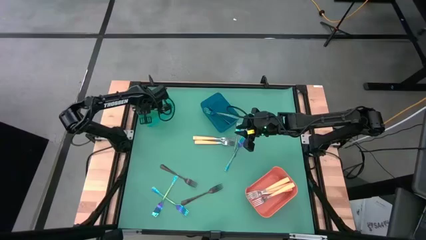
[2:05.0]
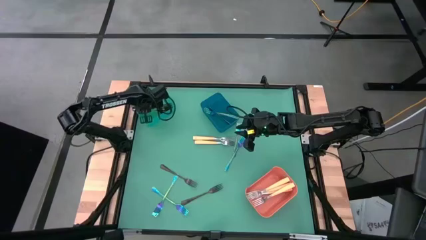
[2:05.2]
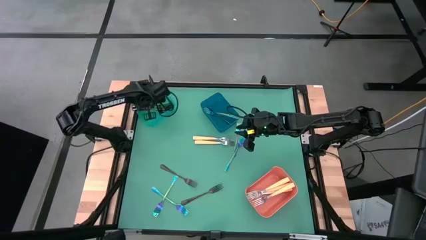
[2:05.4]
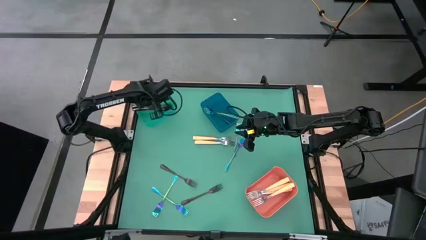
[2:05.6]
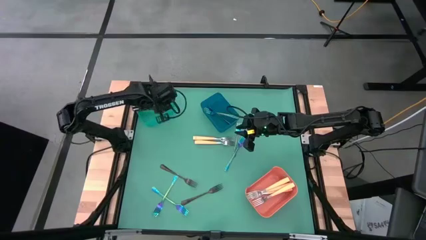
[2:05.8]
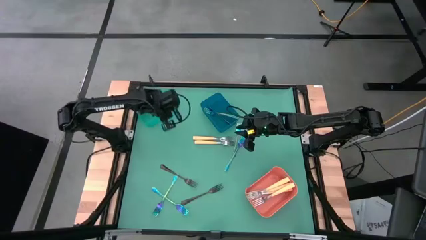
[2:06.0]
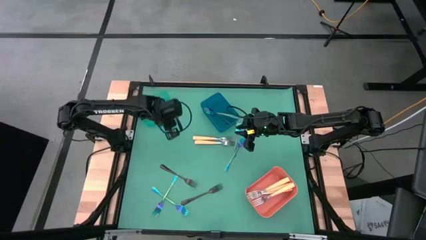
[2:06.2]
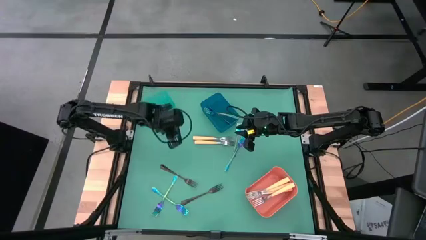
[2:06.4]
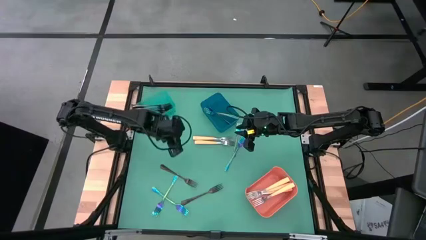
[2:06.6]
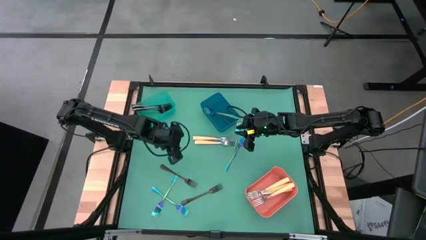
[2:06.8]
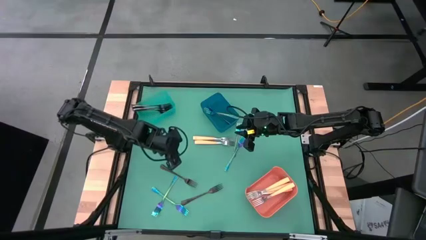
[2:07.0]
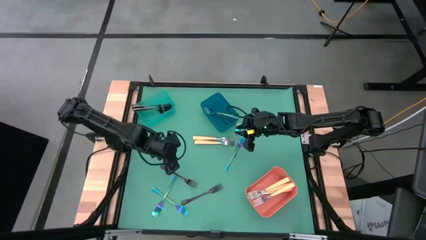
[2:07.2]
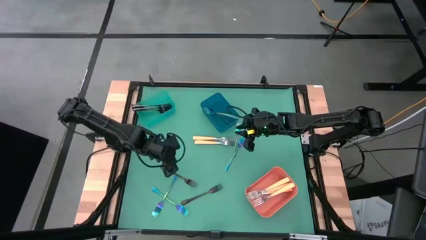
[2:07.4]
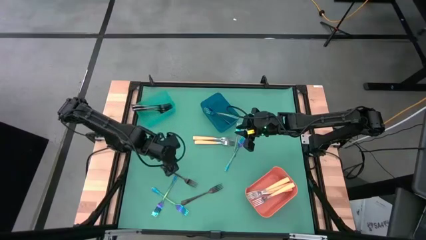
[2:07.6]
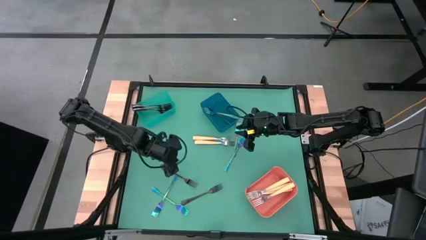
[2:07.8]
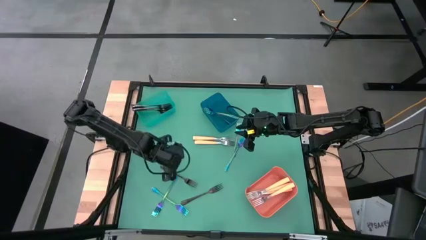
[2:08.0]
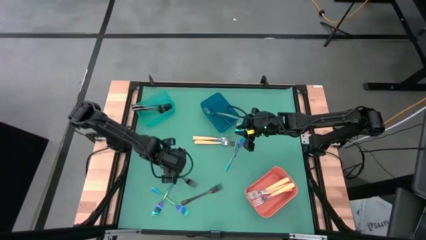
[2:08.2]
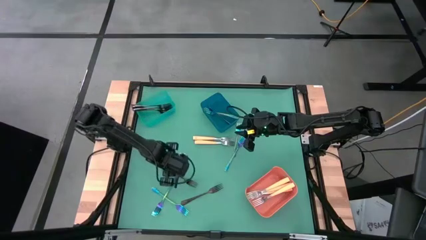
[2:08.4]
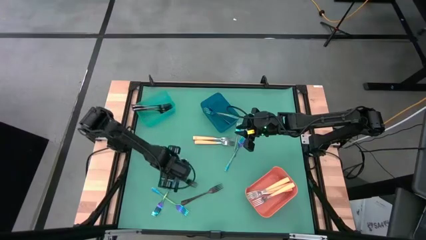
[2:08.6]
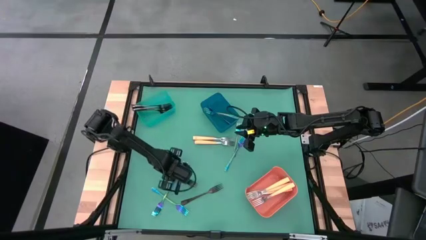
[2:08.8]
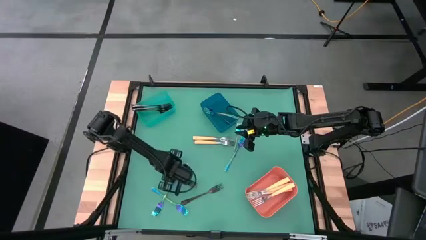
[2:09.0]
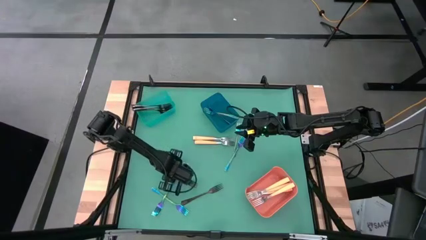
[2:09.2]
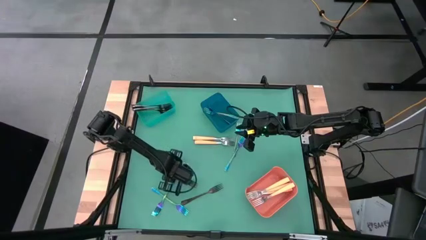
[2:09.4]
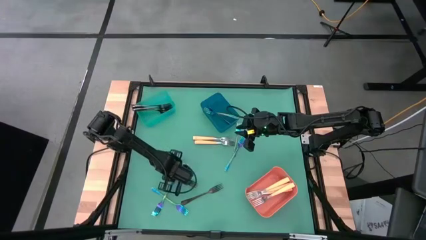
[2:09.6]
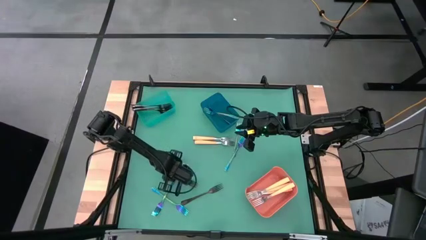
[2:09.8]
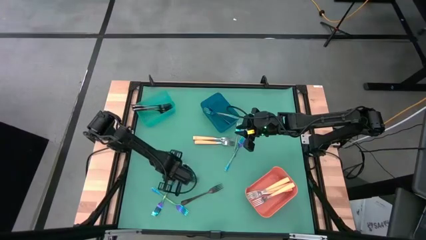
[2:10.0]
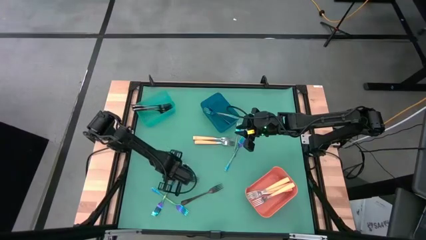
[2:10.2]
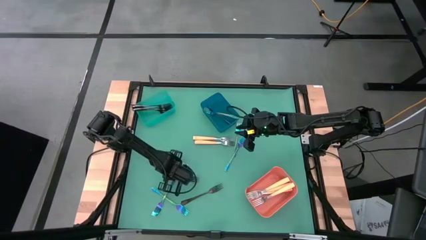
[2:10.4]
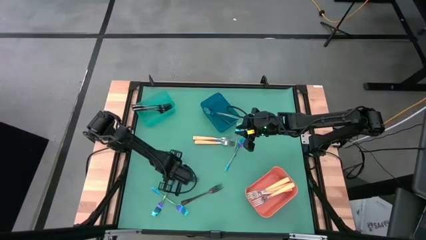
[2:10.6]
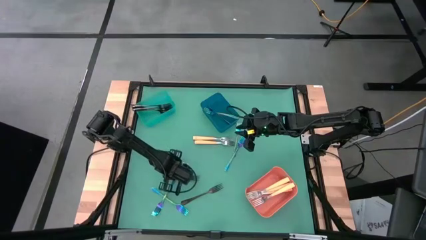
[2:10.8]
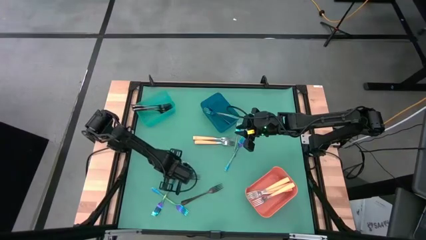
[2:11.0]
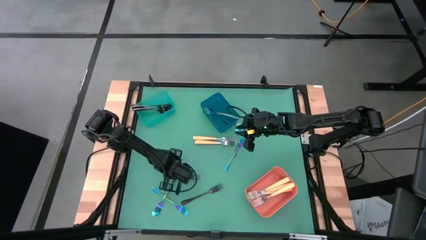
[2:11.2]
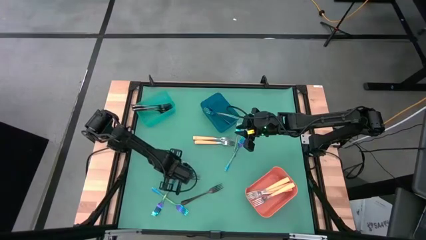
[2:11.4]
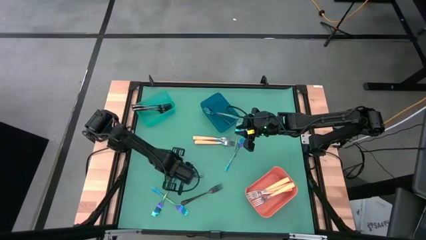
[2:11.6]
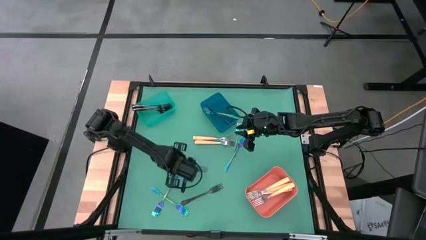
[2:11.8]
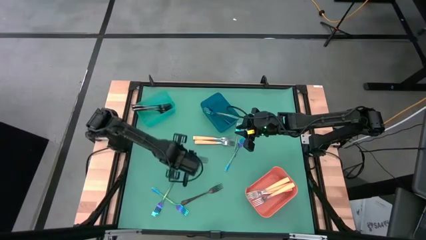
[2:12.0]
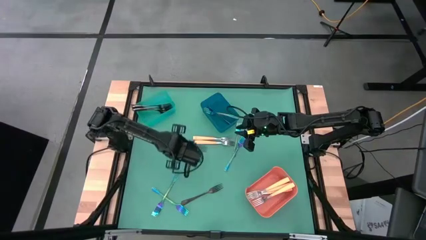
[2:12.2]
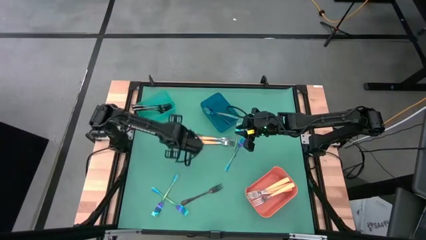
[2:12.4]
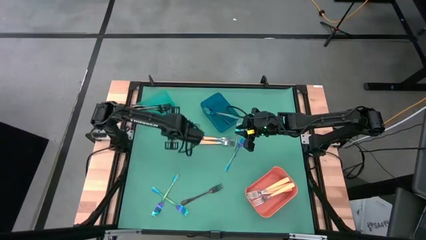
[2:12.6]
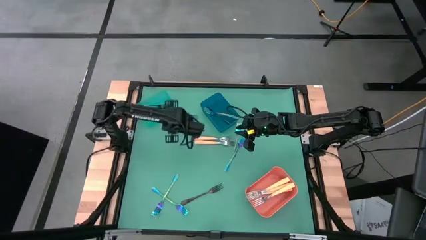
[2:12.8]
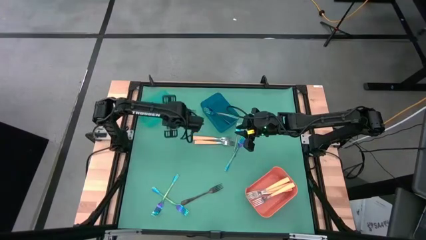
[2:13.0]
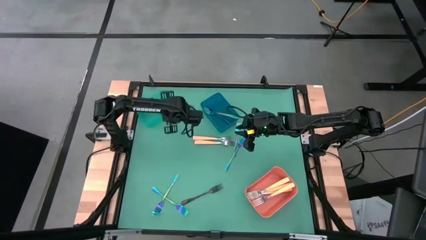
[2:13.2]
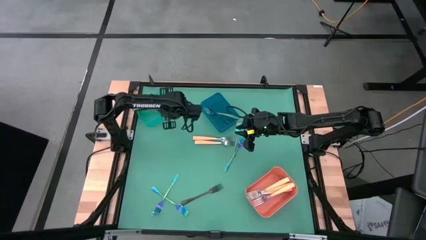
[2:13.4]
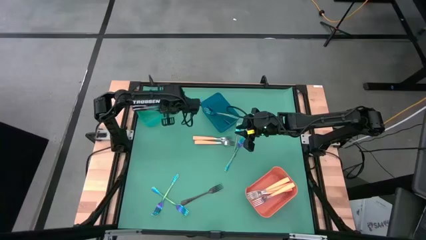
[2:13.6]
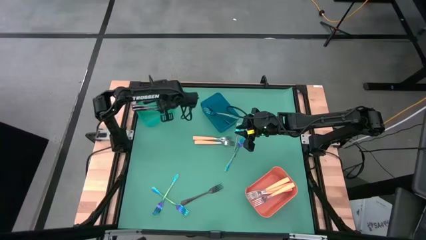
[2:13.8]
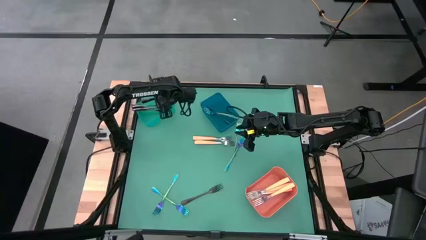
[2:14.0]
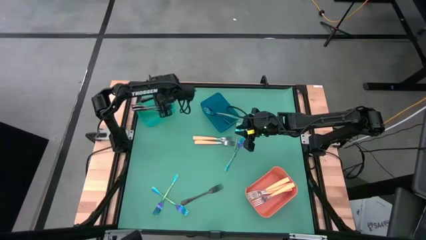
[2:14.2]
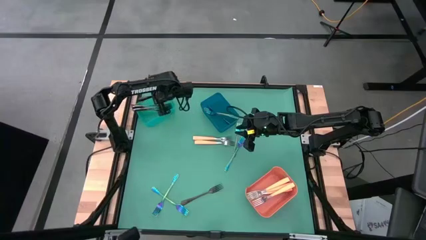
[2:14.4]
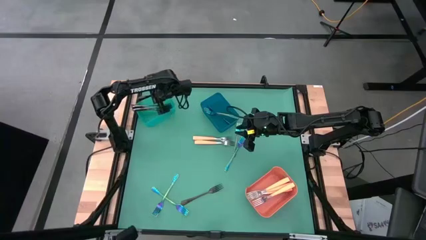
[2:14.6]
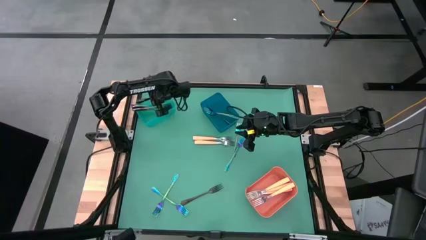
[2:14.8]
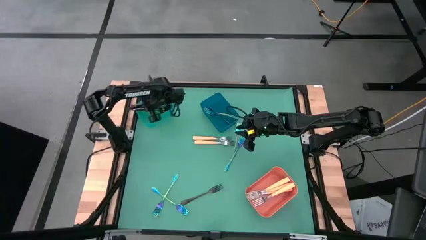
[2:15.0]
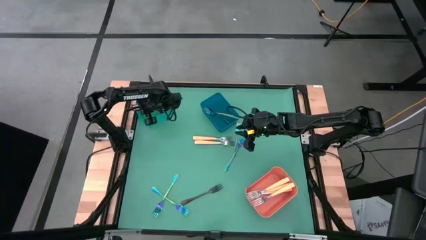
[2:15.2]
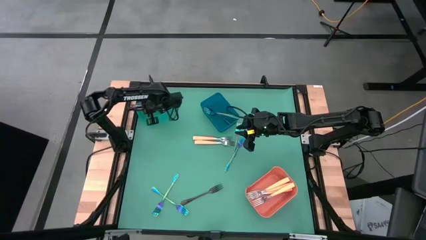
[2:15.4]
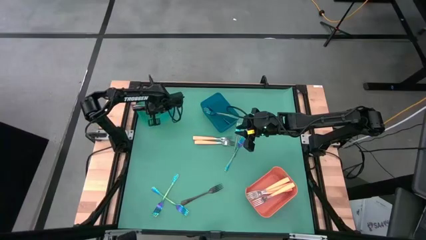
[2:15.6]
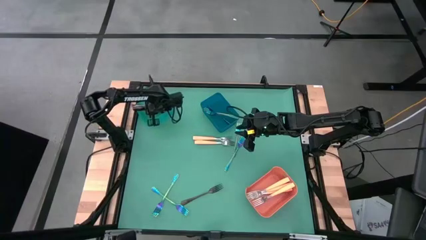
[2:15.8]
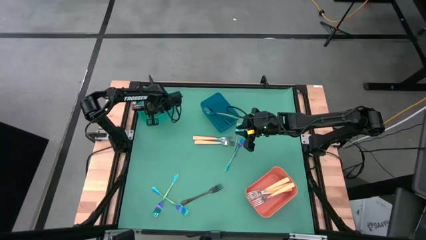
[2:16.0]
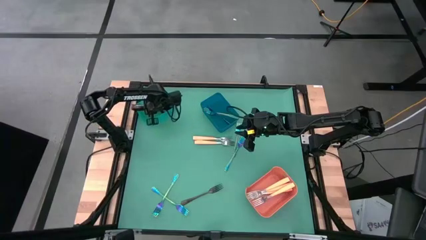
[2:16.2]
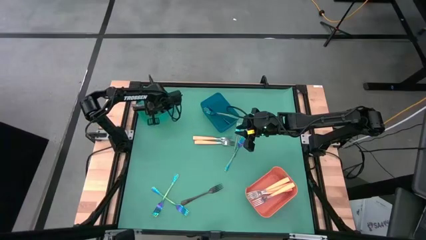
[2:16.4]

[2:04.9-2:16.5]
Task: Sort silverware by color (type)
Put the black fork into the green bin

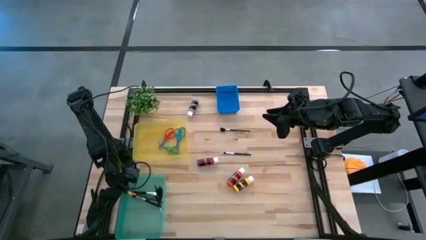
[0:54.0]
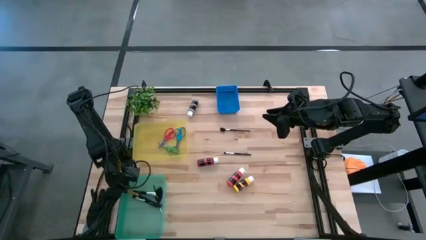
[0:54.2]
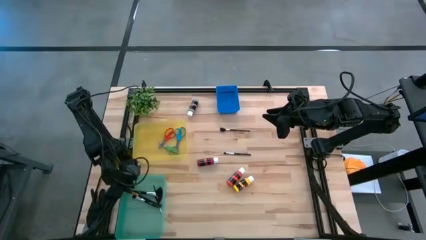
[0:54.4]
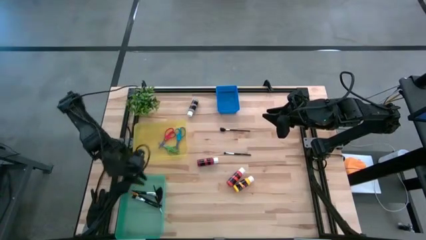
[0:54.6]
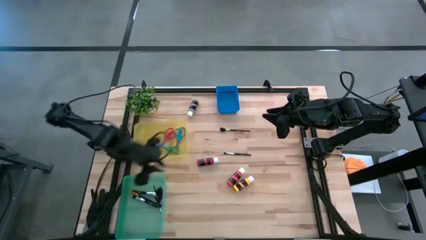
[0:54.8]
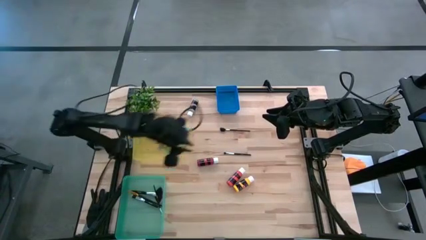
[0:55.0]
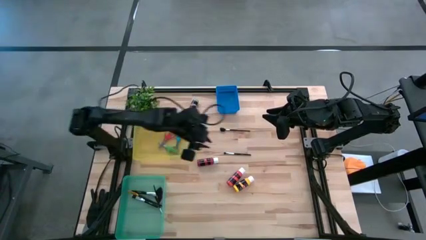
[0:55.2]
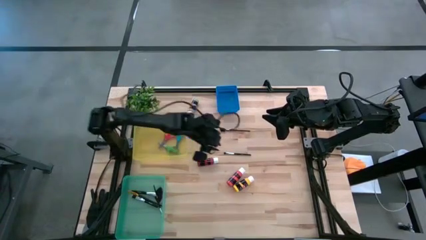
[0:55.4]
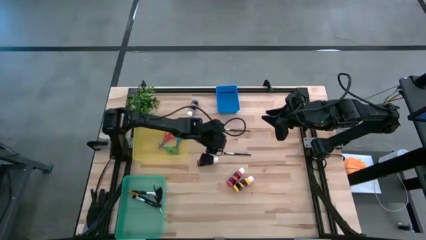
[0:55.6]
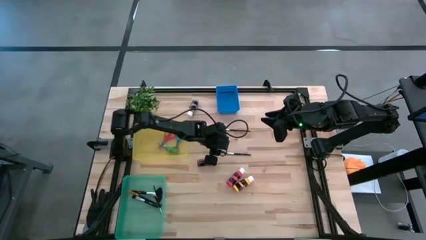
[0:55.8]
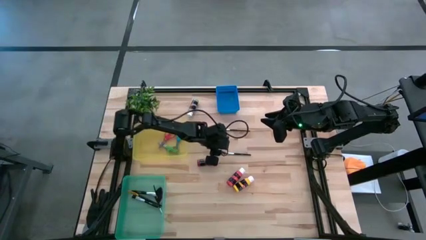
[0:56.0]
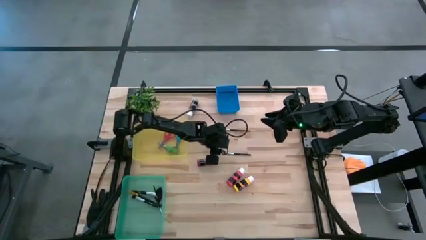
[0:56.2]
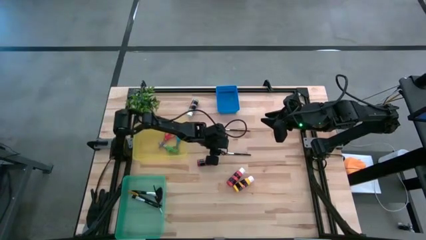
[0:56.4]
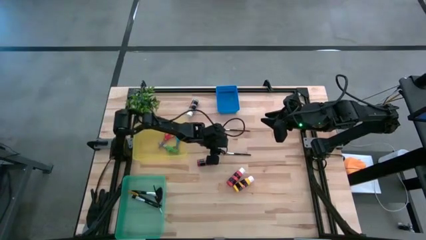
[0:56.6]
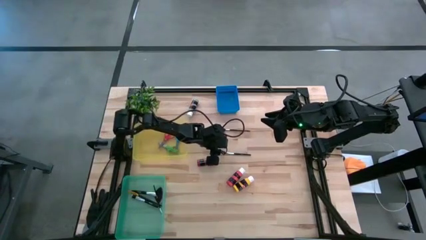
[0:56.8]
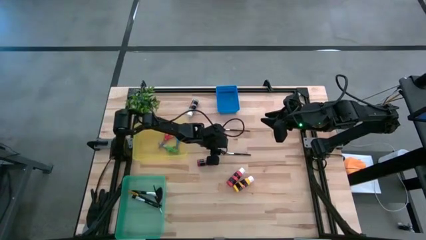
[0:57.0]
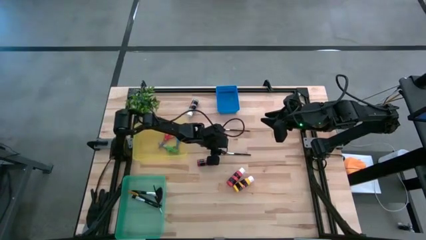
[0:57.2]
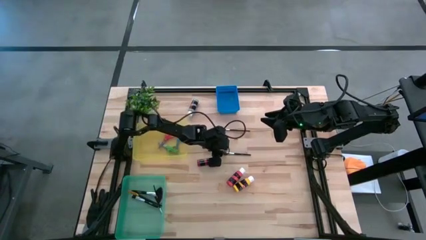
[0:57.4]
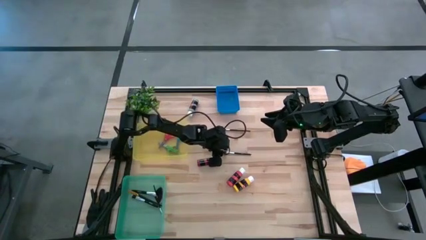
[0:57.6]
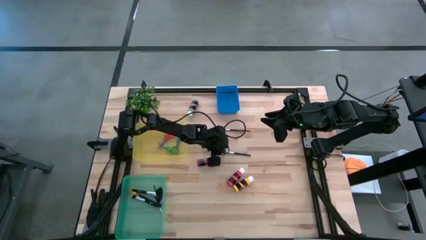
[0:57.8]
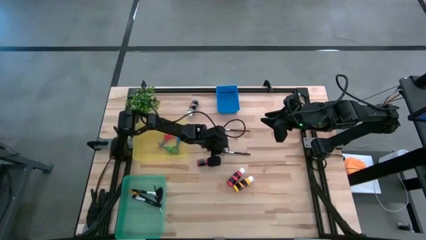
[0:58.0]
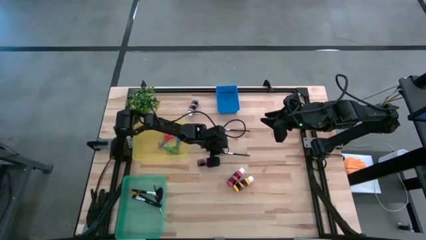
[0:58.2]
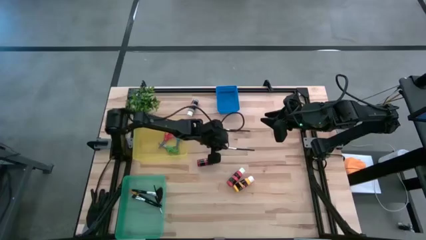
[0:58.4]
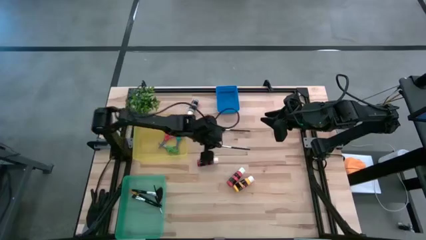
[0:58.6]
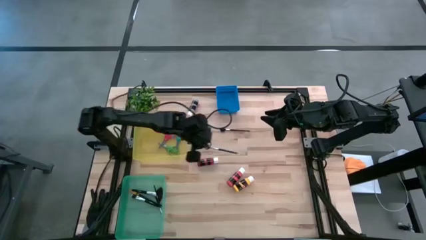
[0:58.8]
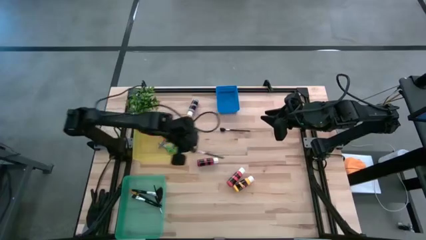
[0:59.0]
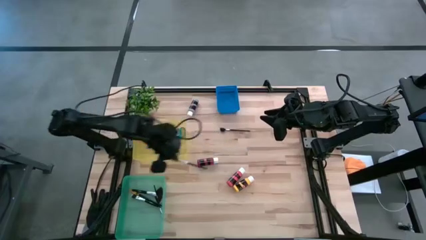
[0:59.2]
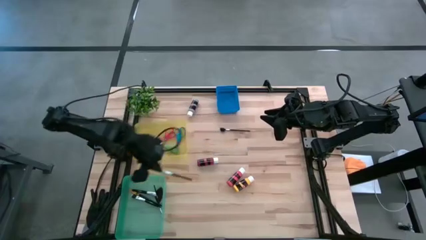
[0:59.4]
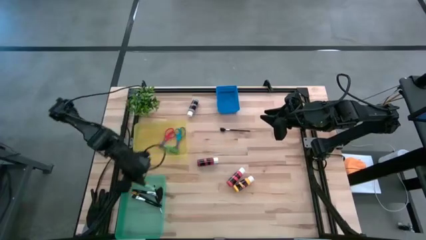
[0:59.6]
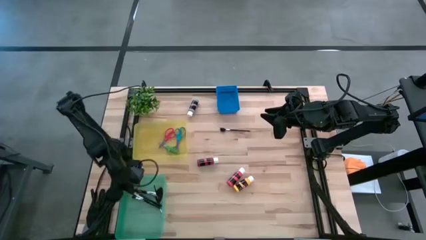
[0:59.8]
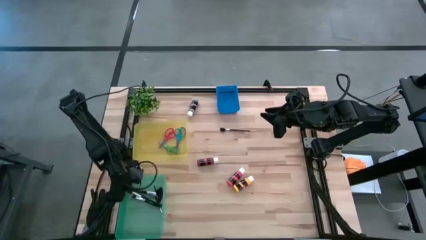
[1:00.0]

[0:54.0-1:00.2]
Task: Pick & Place Paint Supplies
Put the eyeshadow brush into the blue bin
